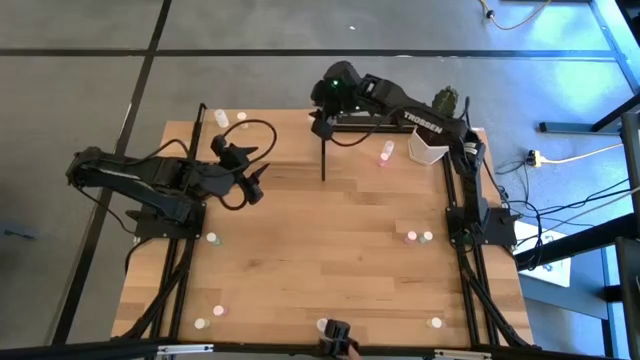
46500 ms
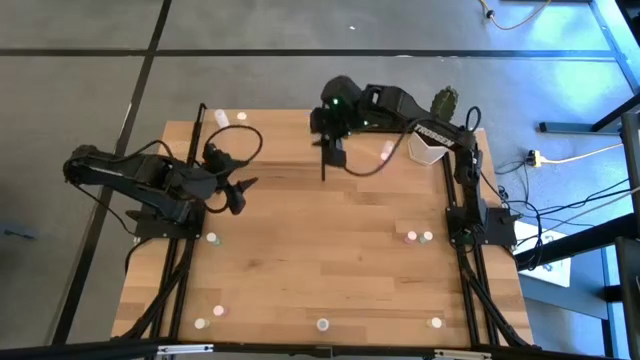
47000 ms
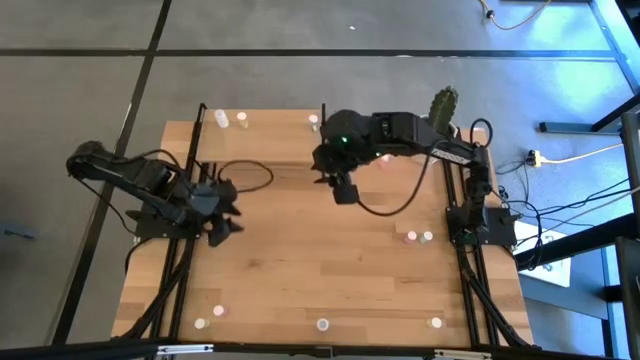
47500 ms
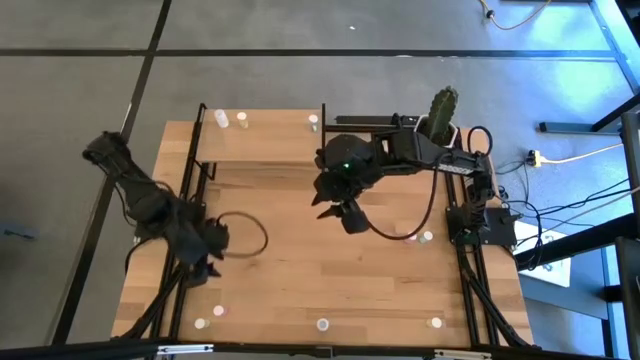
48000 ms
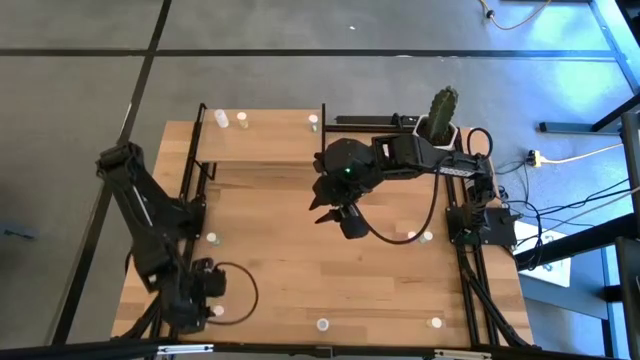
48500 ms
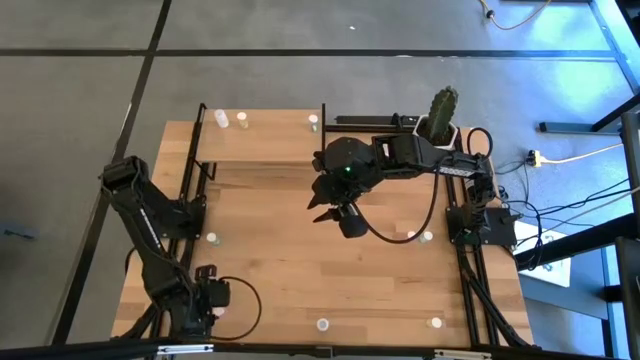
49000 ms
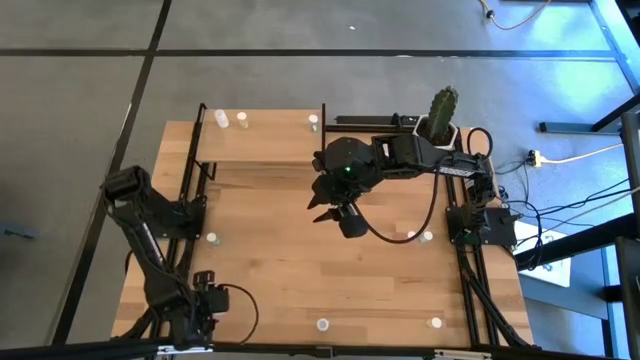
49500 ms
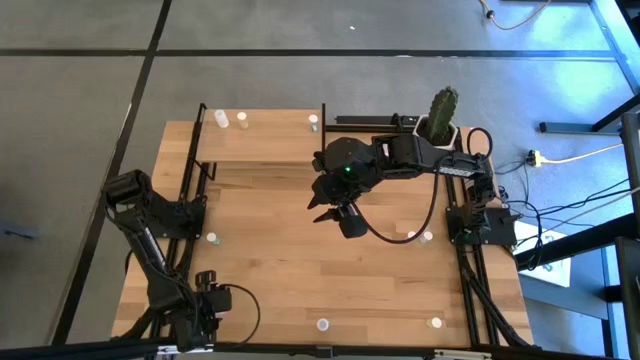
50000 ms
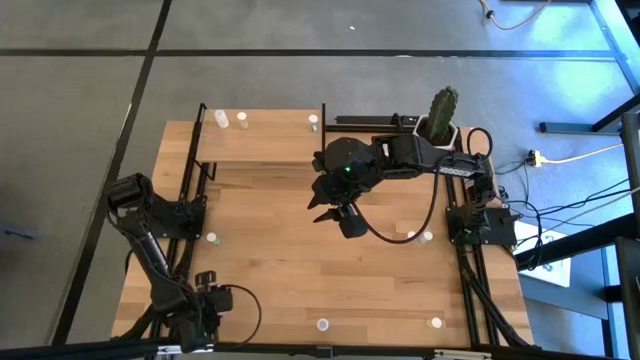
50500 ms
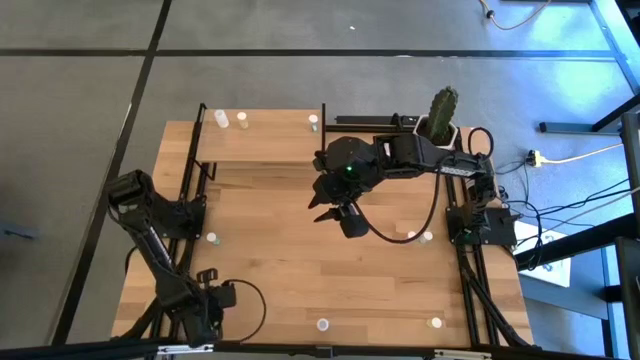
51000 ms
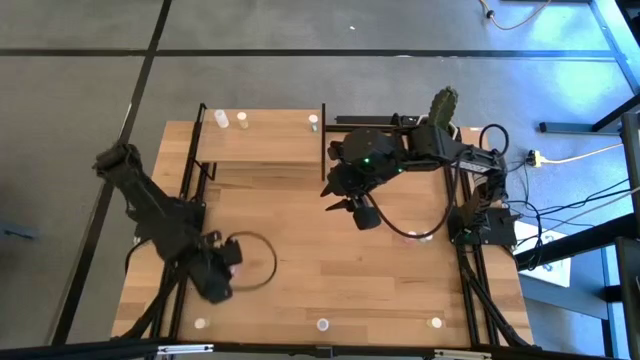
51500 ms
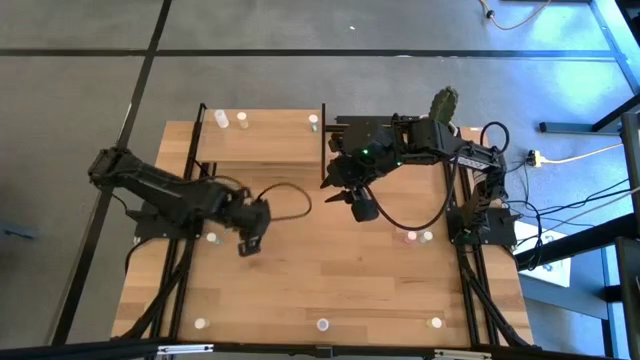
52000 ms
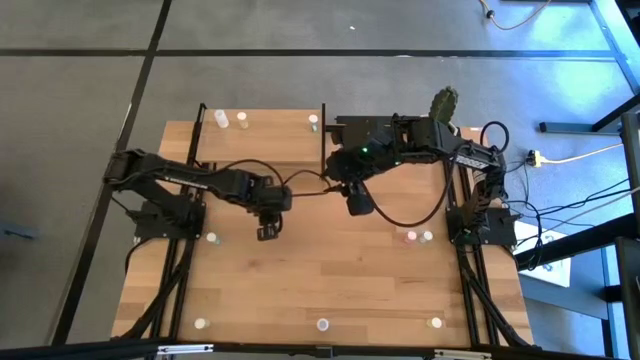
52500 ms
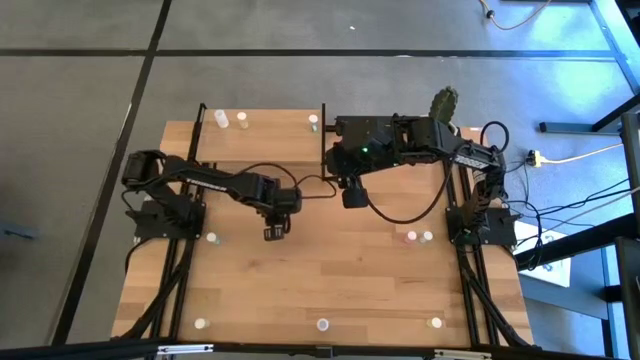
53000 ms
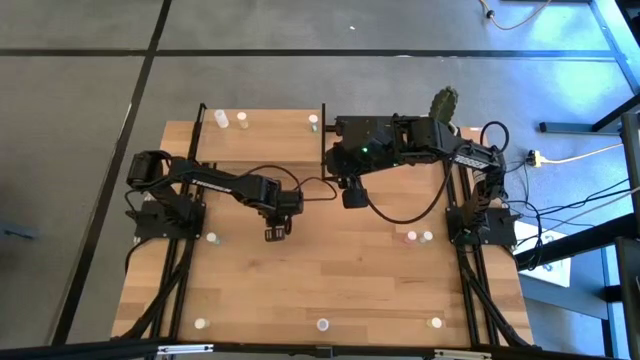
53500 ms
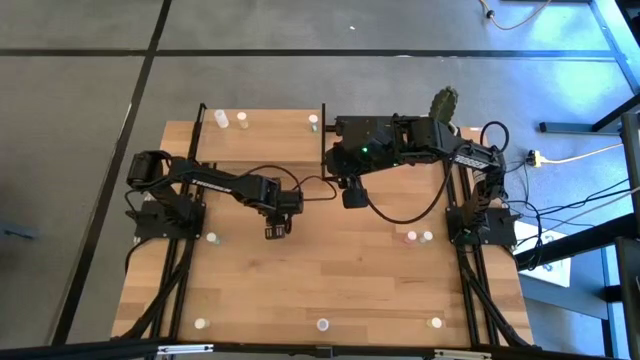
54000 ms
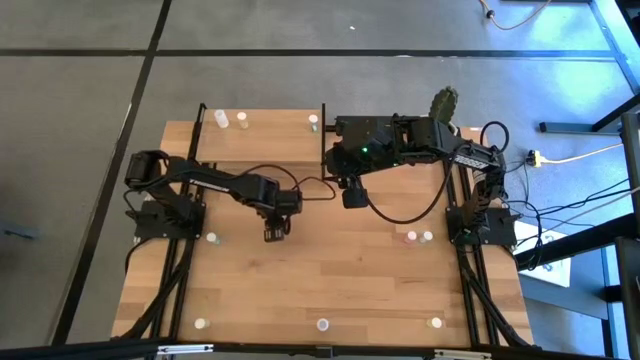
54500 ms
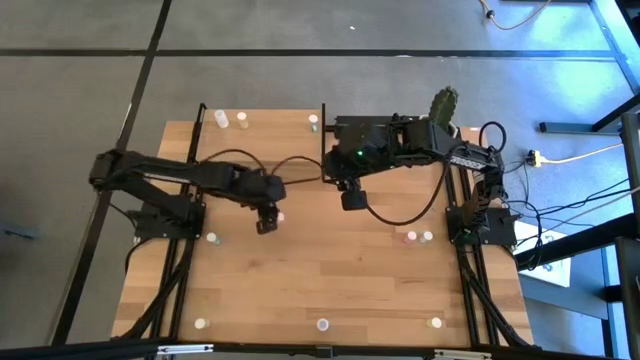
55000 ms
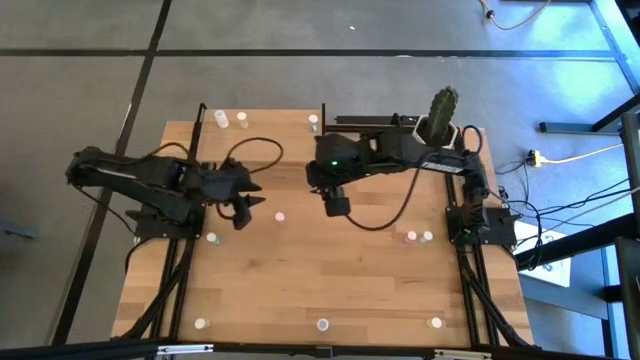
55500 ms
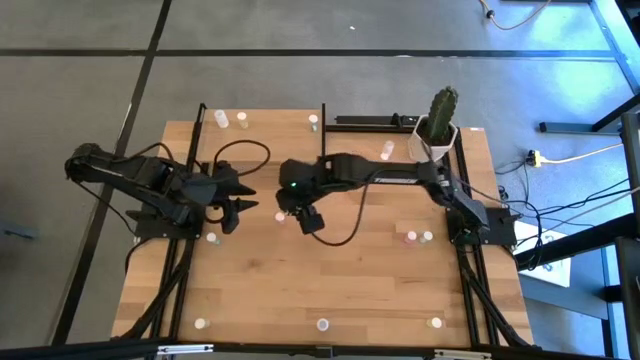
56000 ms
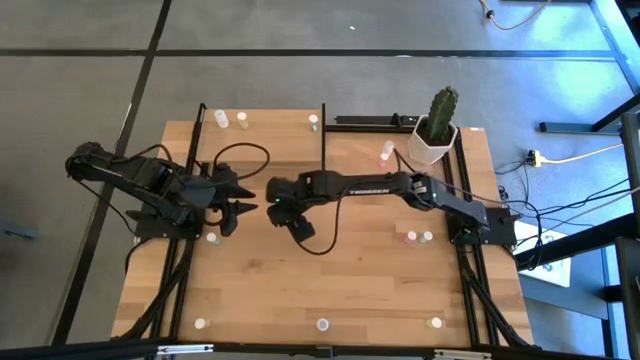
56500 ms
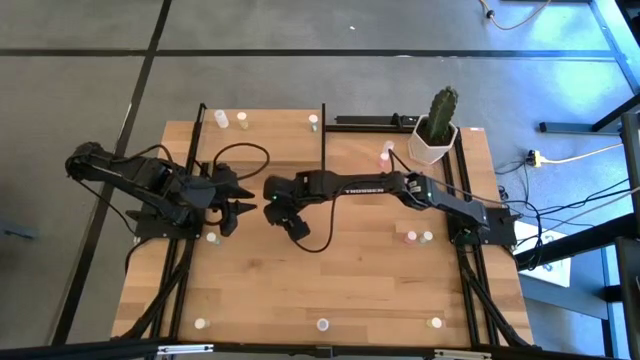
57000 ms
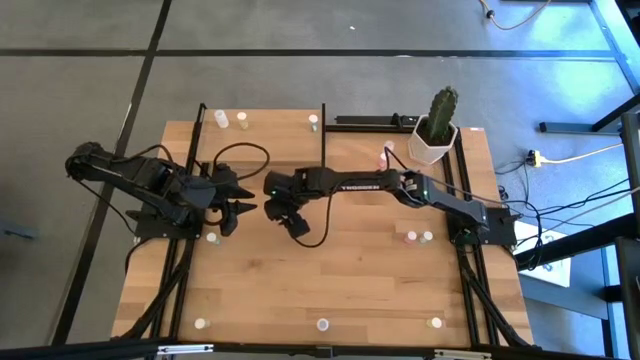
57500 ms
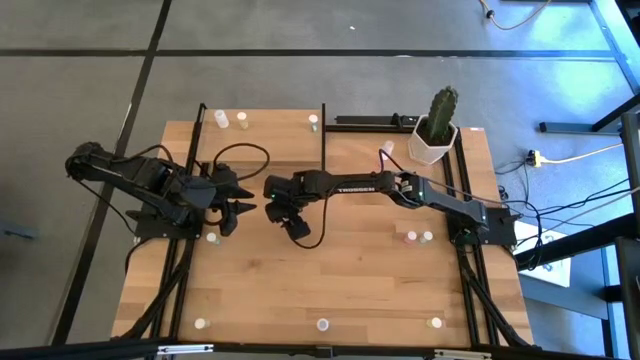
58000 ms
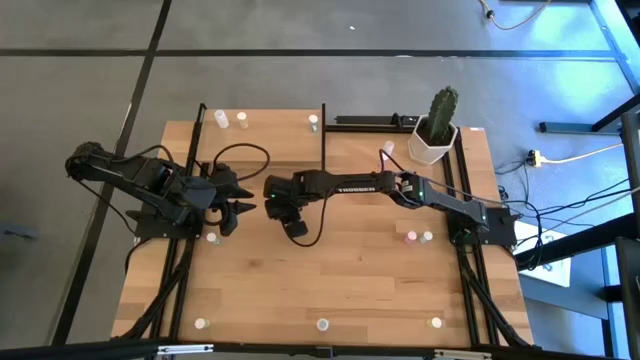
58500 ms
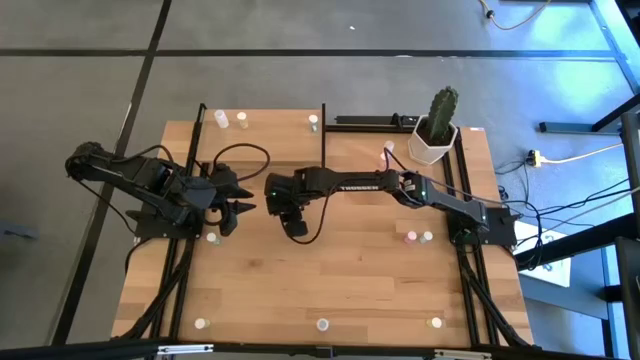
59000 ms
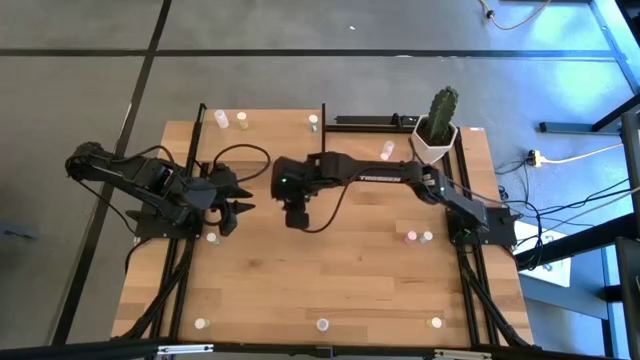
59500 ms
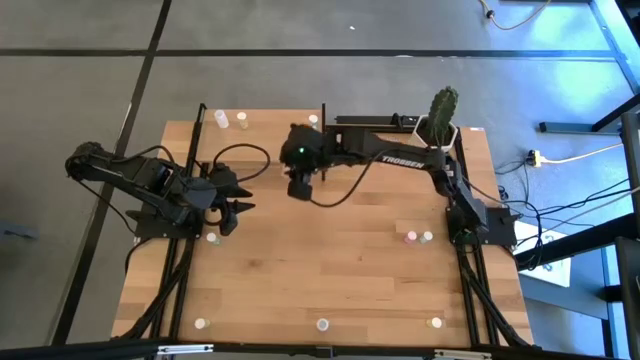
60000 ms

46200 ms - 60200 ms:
Task: Pick and place medicine bottles onto shelf by color
Put the bottom pink pill bottle on the shelf

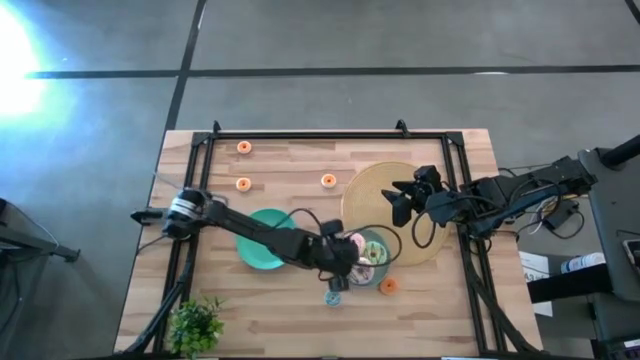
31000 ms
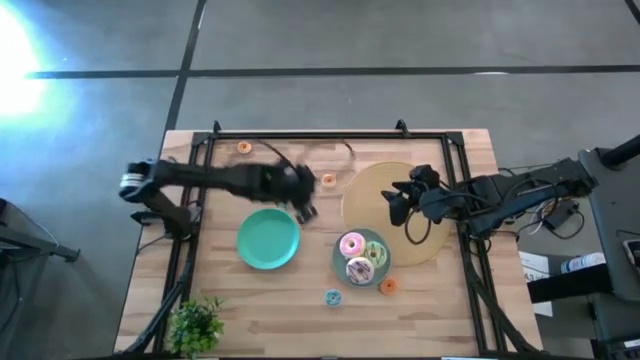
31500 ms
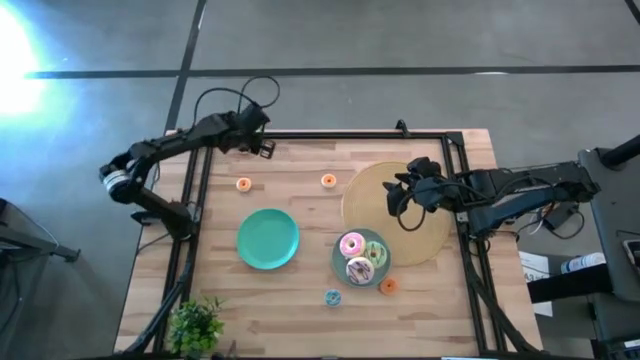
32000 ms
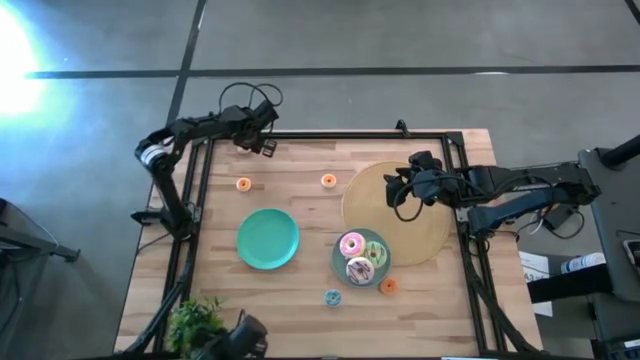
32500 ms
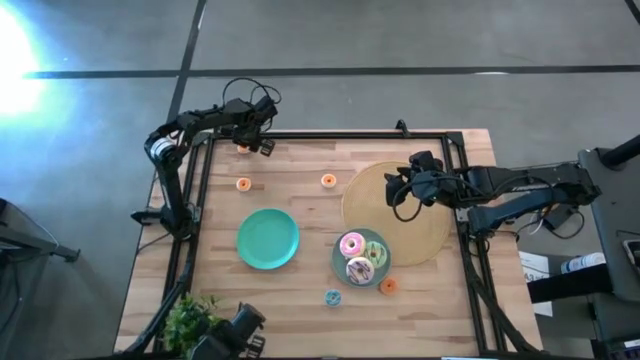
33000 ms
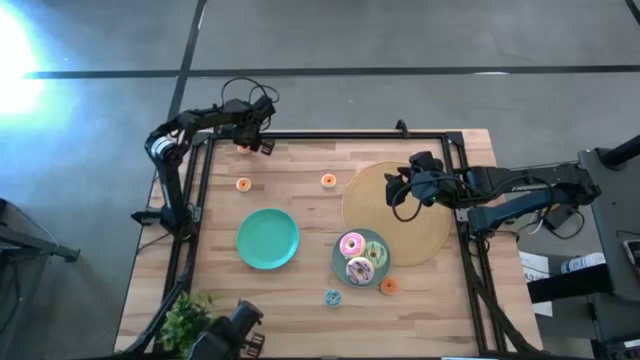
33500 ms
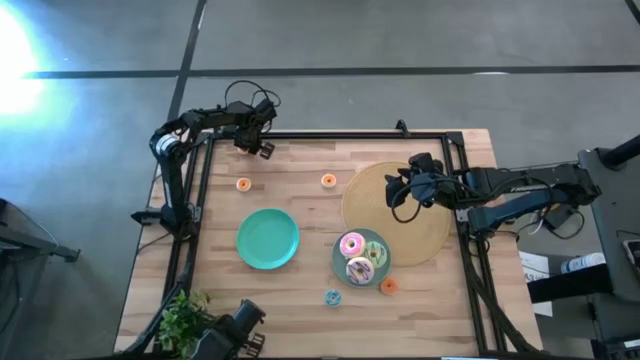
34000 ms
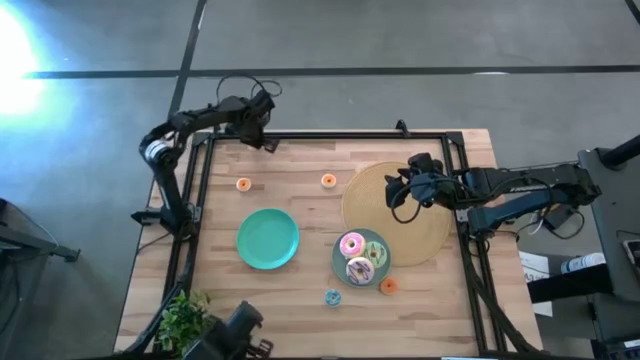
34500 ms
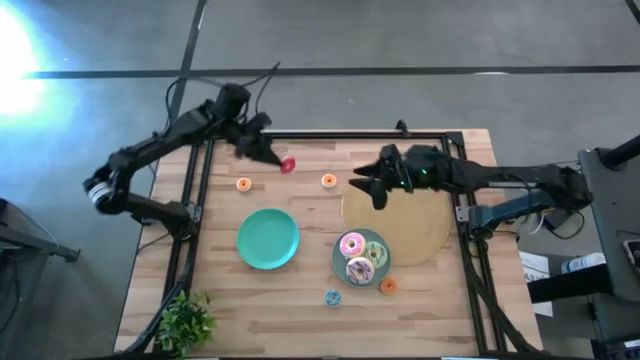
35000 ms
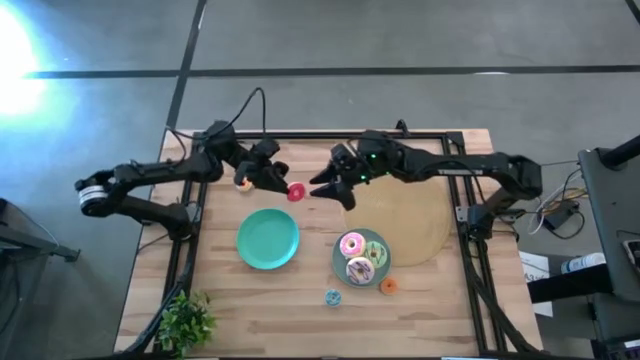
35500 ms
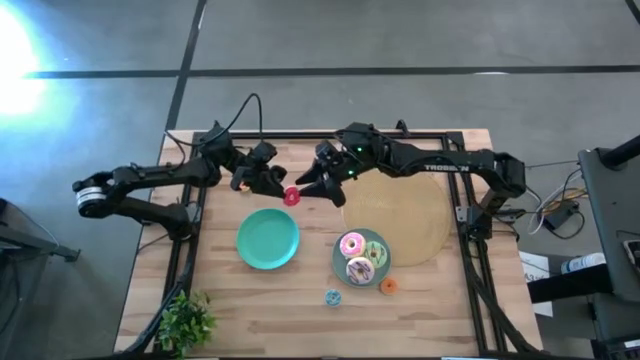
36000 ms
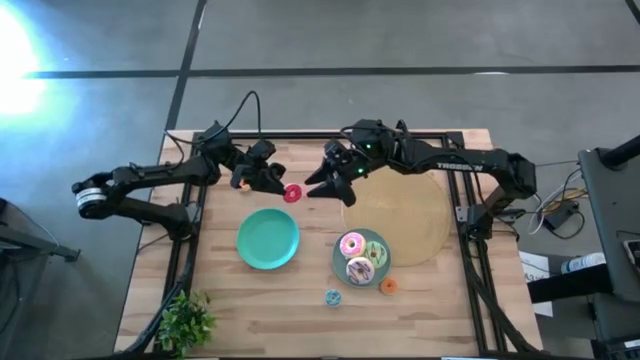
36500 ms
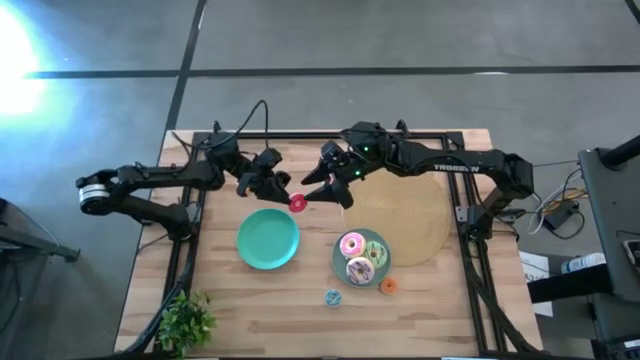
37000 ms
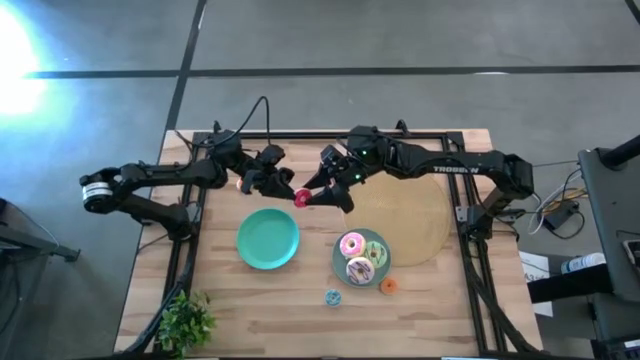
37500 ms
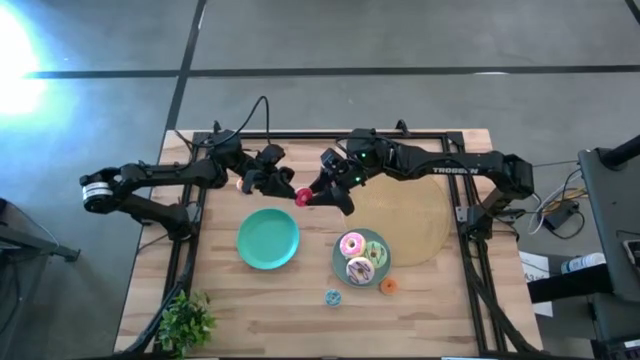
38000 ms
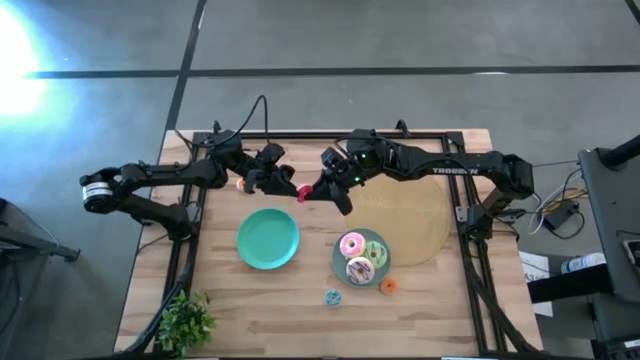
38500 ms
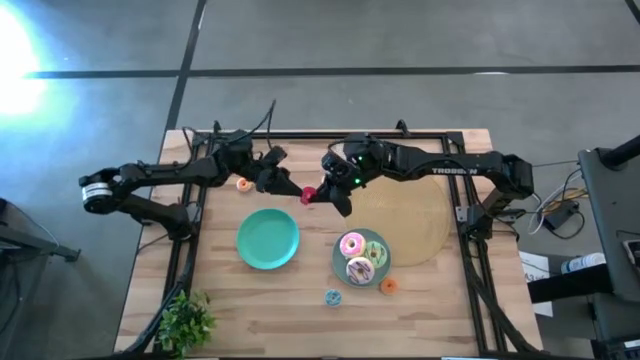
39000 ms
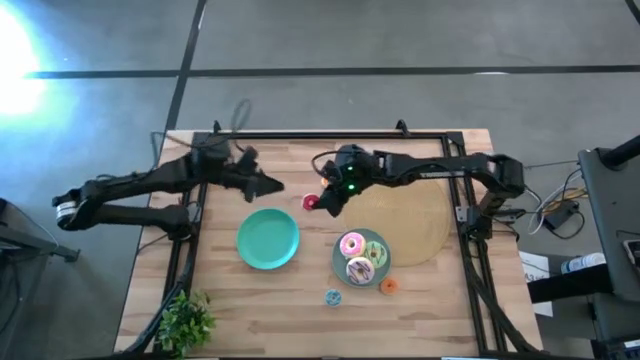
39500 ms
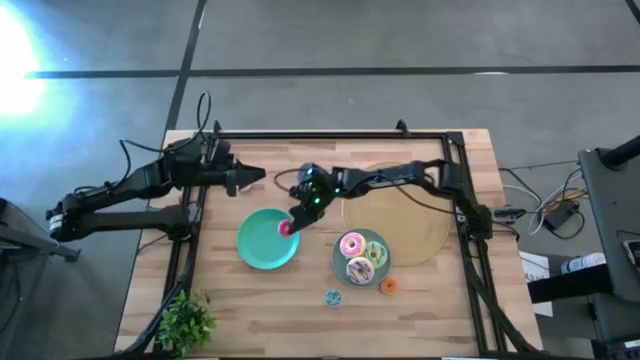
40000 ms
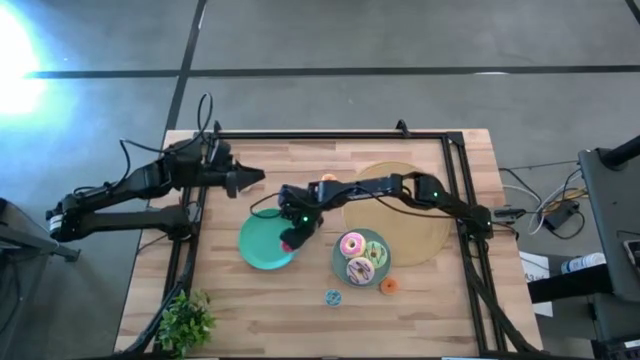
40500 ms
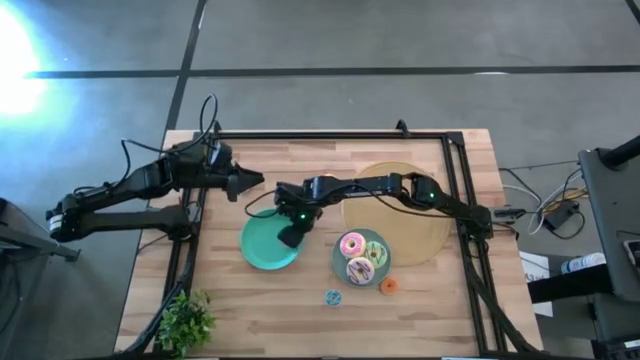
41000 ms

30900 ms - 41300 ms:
Task: Pick & Place donuts
Put the small red donut on the green plate
